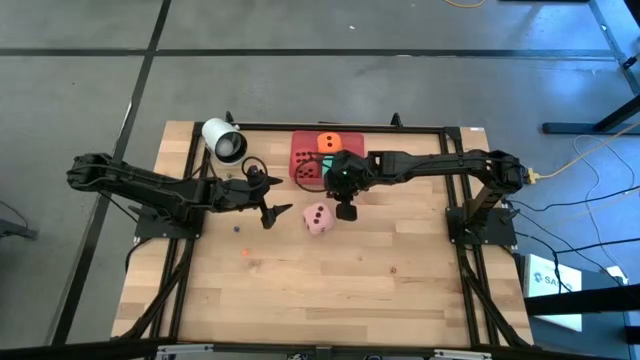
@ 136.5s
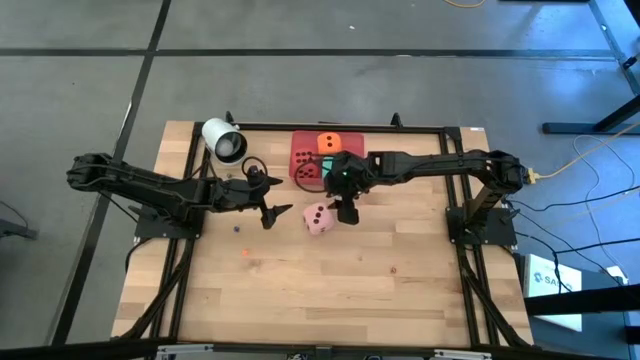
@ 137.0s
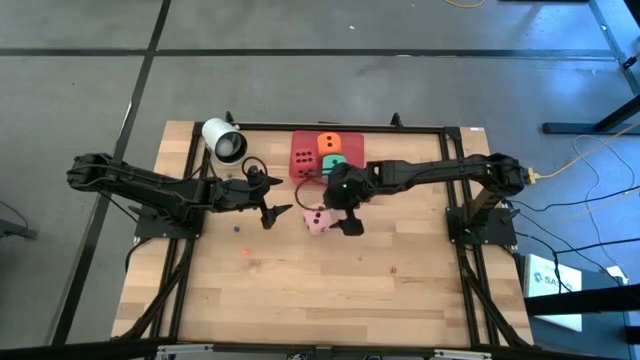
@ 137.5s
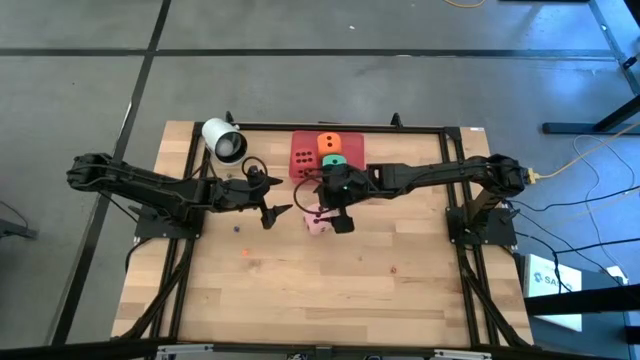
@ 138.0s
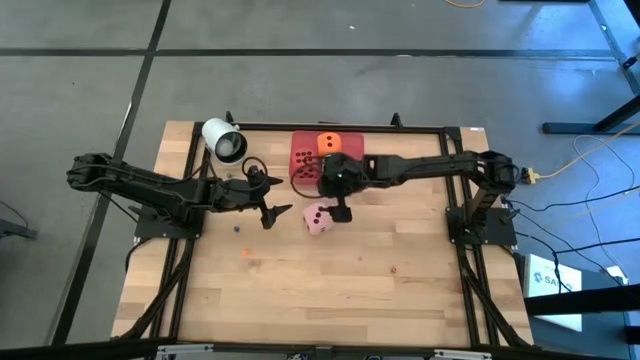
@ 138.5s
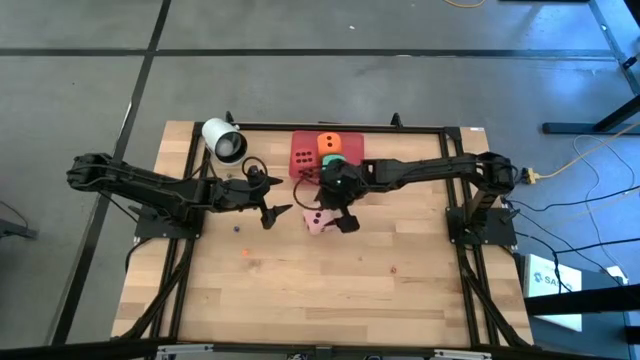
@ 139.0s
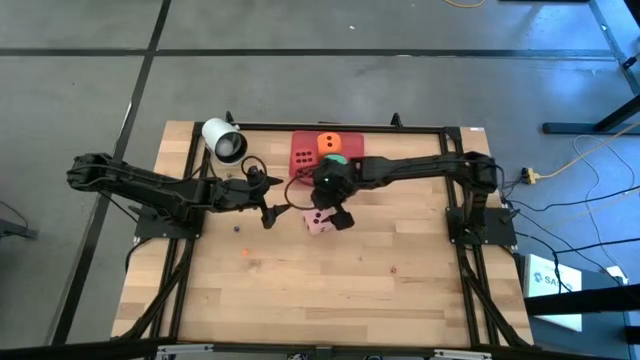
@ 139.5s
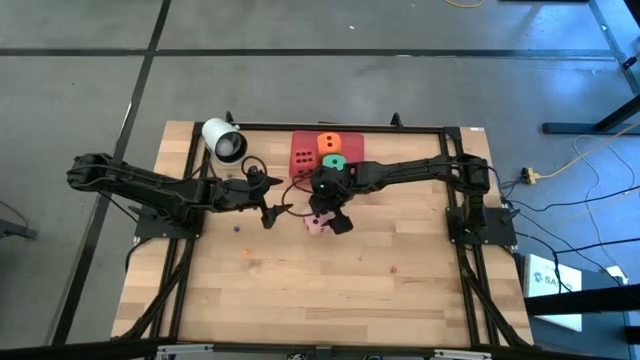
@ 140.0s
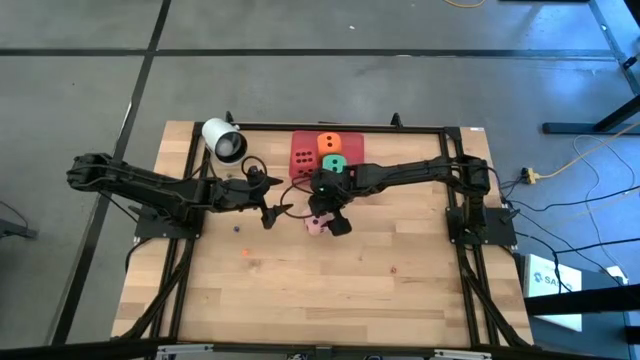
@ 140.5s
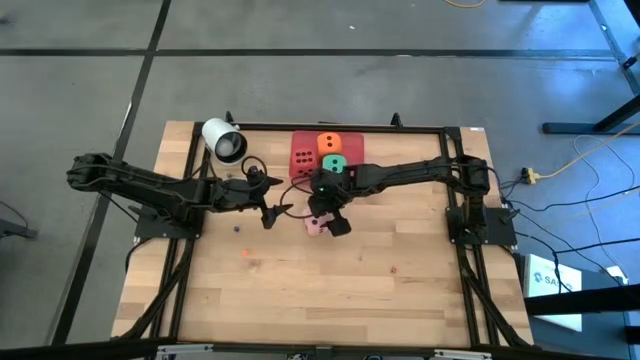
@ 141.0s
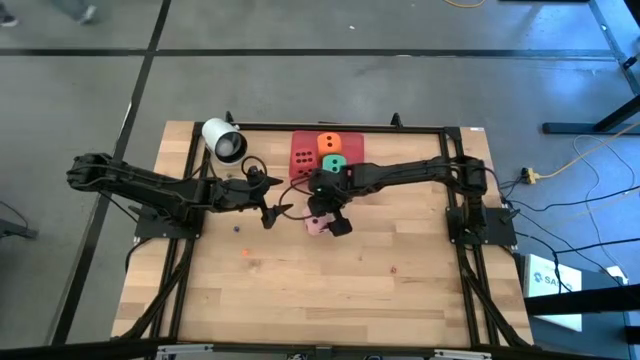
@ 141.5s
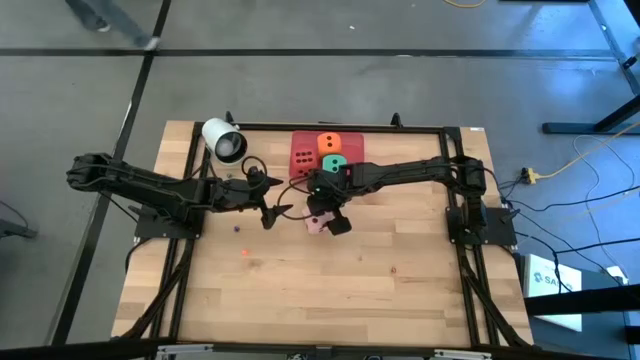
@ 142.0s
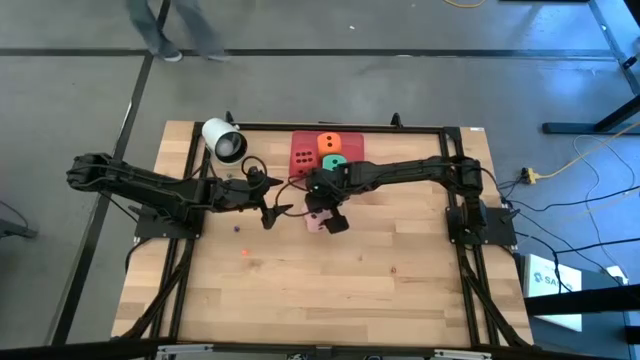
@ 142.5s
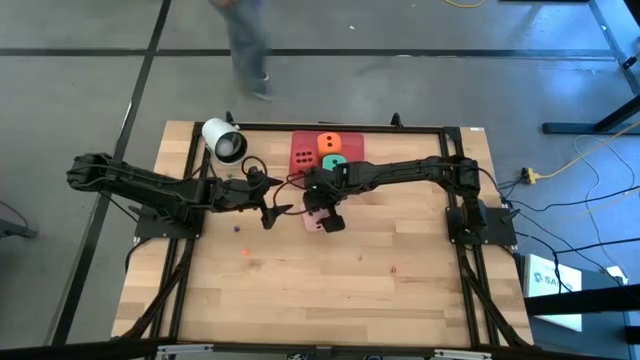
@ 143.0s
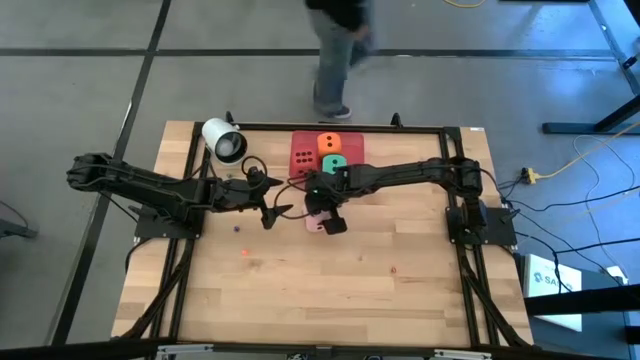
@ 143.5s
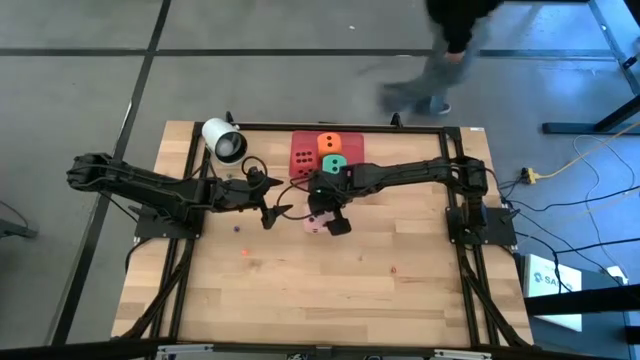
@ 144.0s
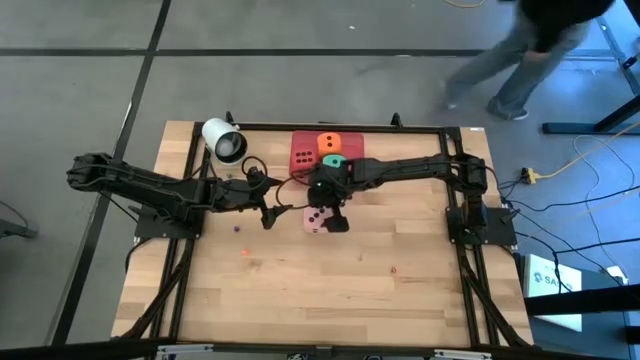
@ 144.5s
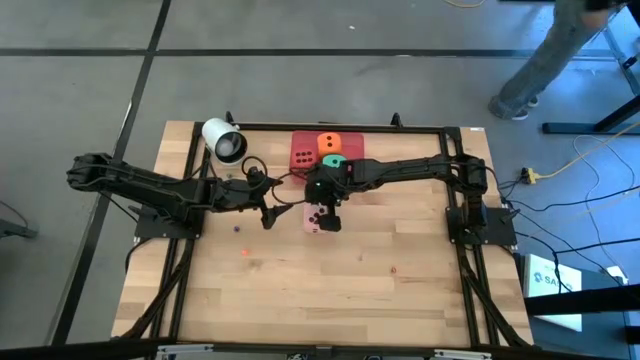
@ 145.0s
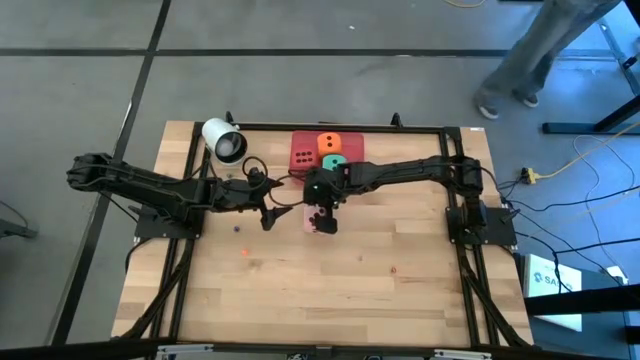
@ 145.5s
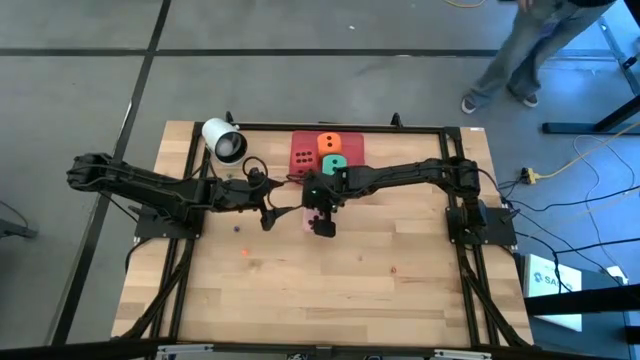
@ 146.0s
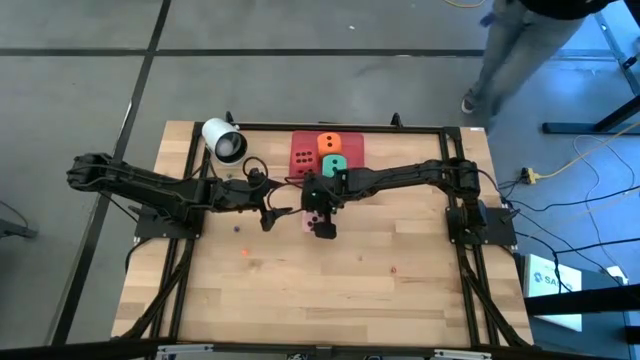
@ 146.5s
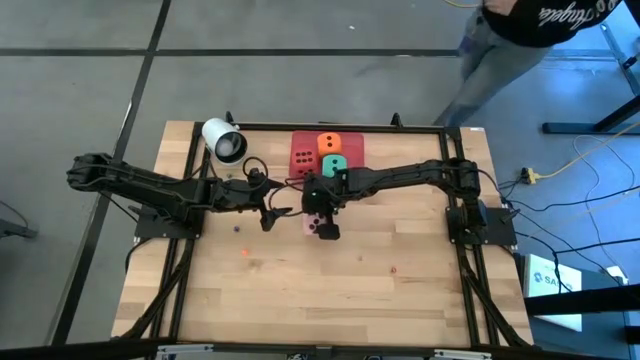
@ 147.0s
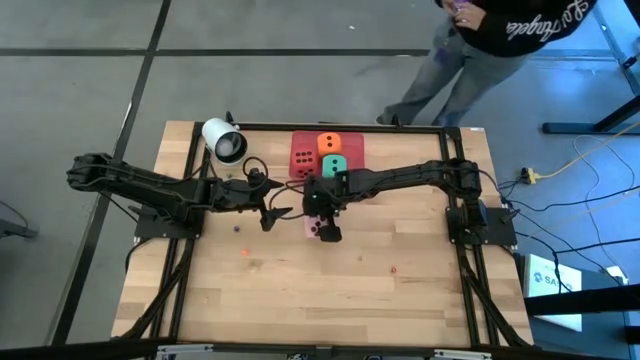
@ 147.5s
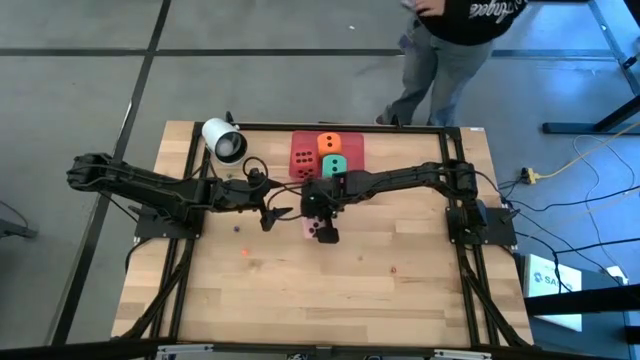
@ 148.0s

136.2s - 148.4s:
Task: Pick & Place Dice
Put the pink die into the pink bin

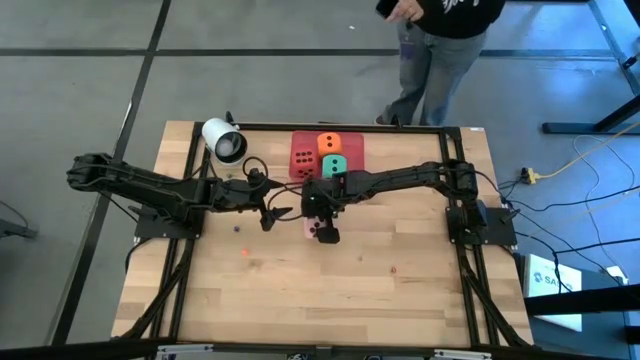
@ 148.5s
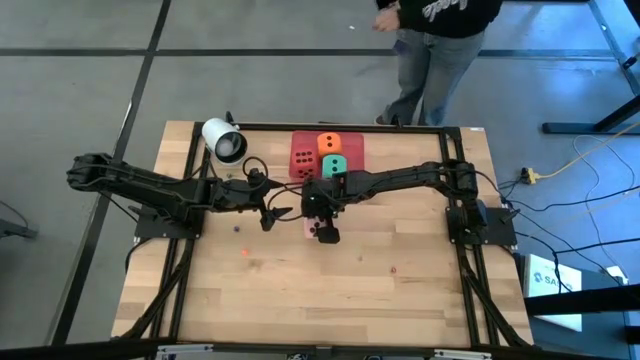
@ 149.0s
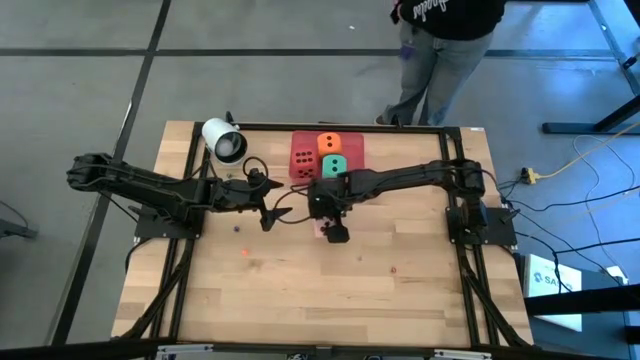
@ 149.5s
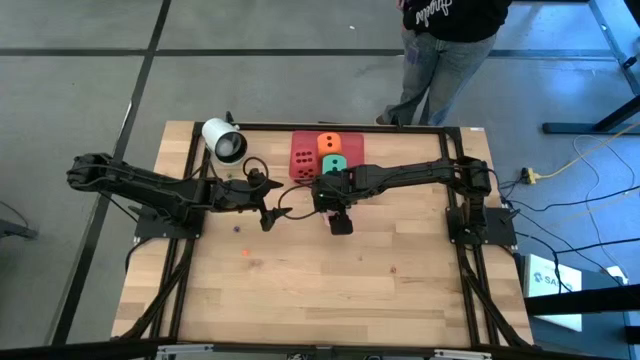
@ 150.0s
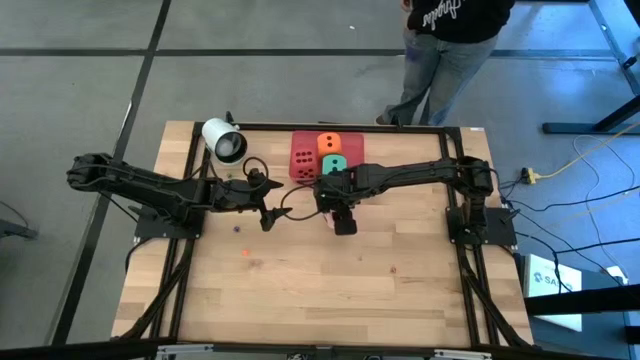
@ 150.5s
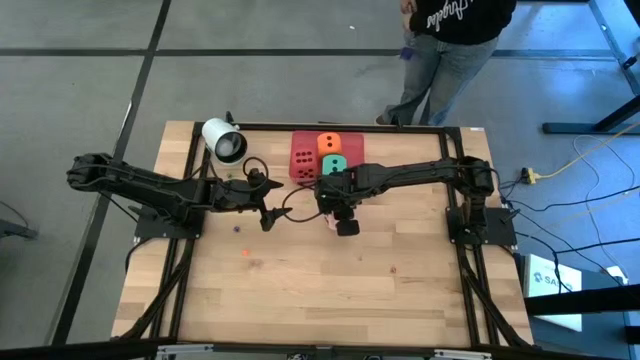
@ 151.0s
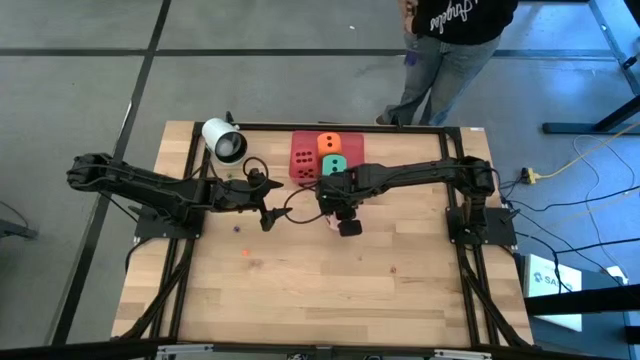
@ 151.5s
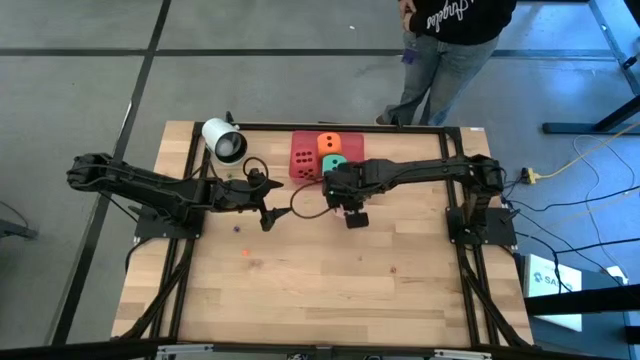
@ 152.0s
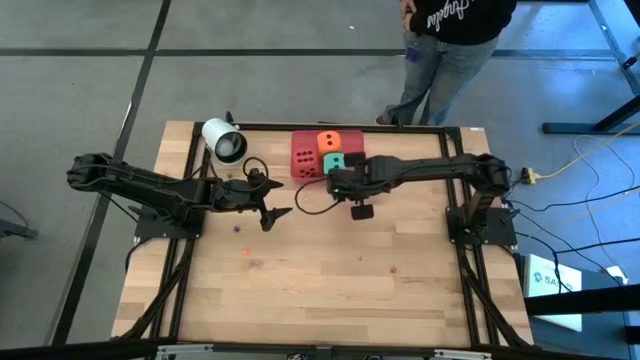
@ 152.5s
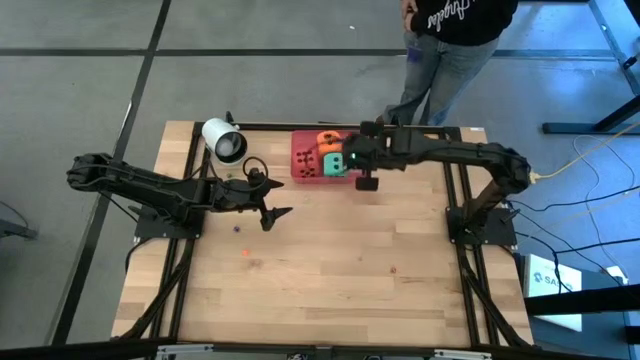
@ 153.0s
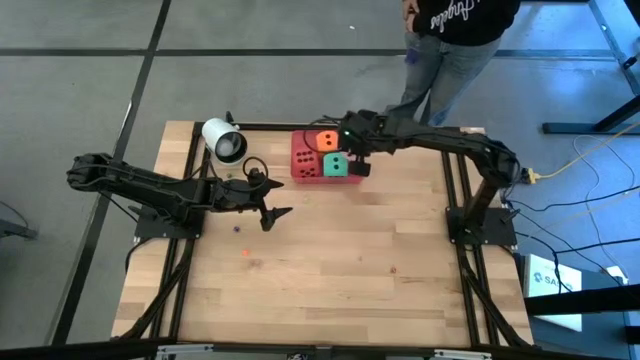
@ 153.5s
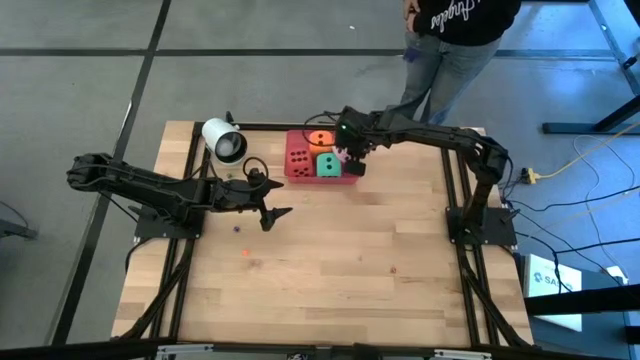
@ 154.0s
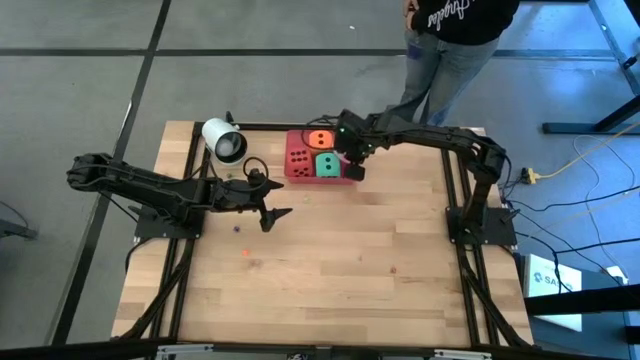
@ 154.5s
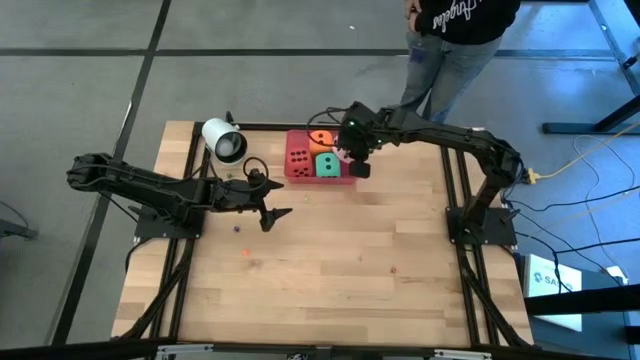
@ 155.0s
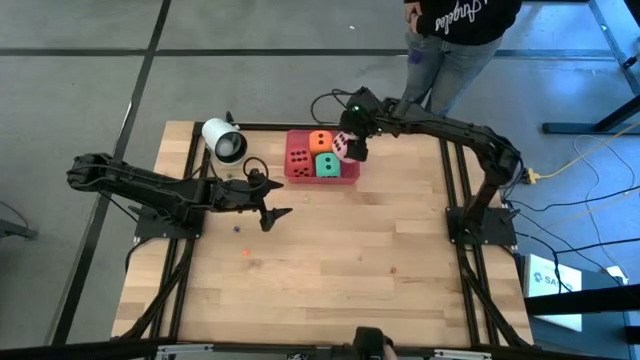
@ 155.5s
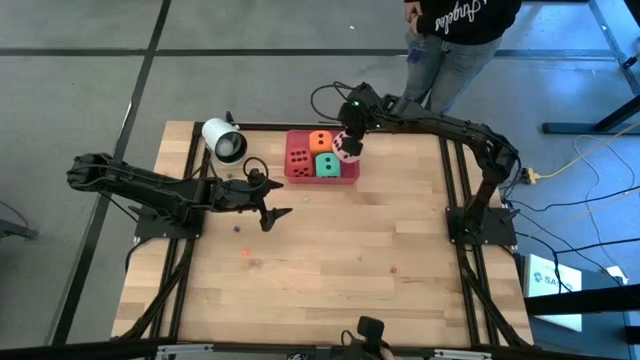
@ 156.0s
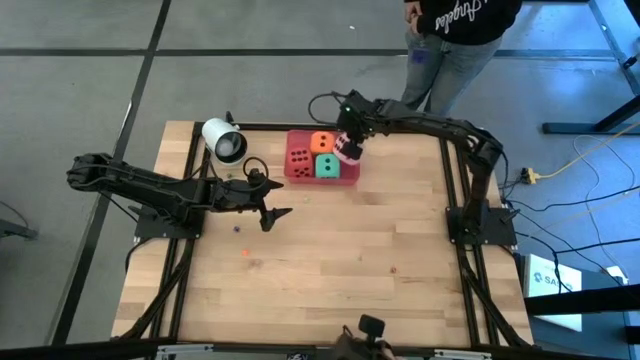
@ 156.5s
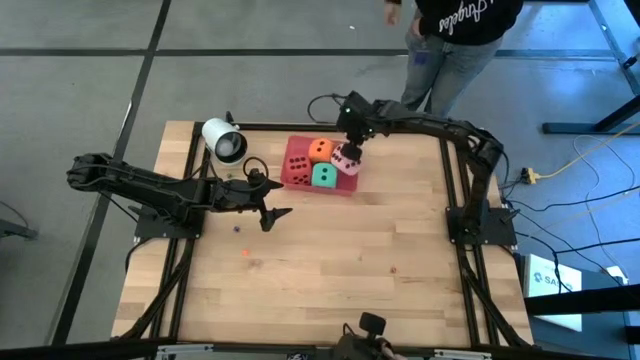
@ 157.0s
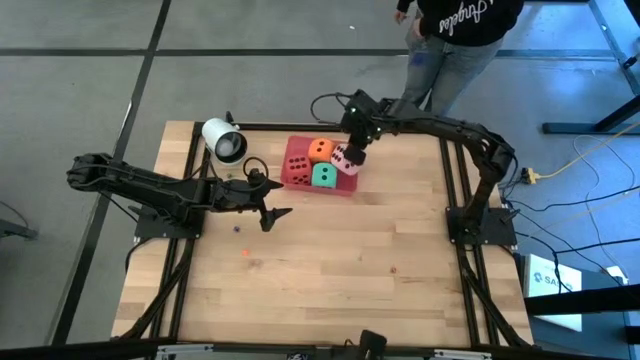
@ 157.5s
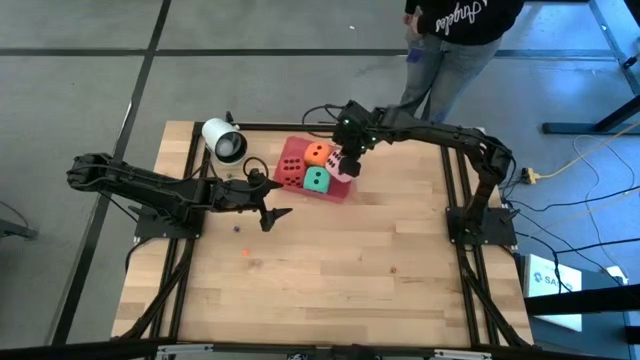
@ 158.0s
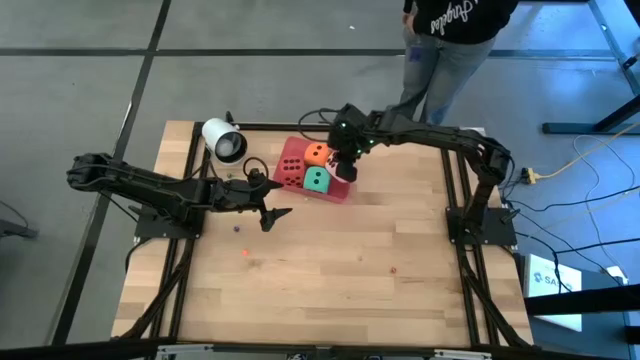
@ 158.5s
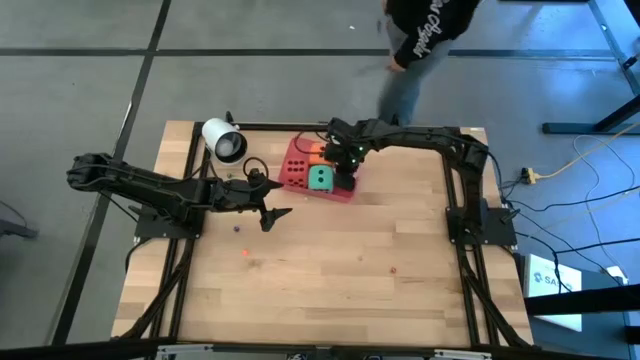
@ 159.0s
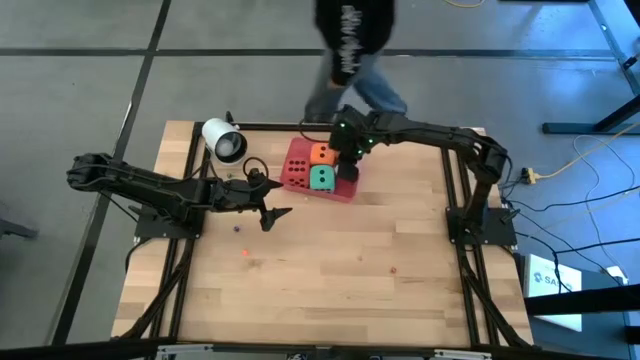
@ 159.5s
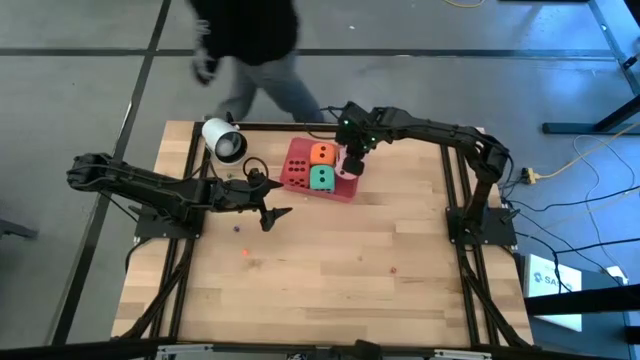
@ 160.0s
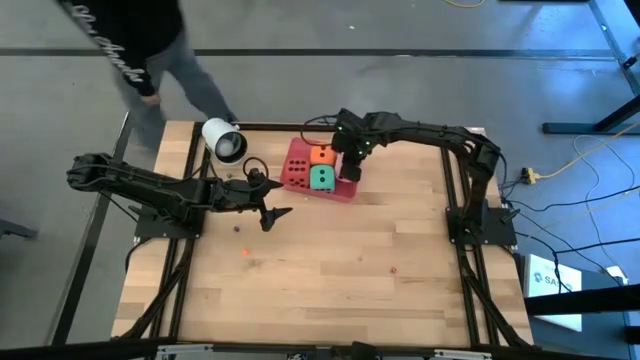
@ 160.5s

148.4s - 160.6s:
Put the pink die into the pink bin
